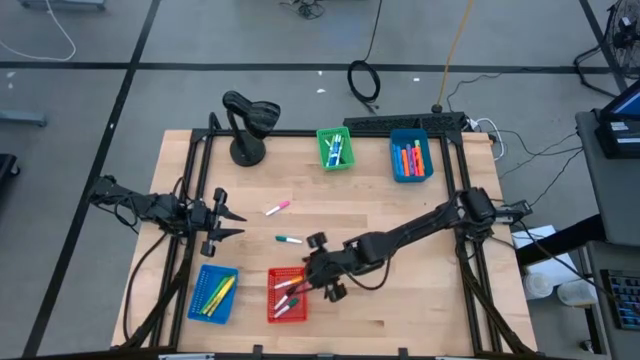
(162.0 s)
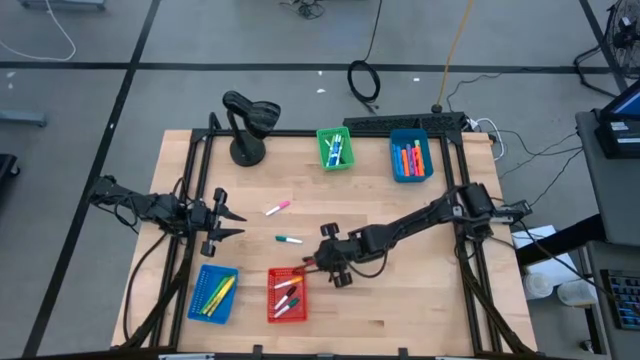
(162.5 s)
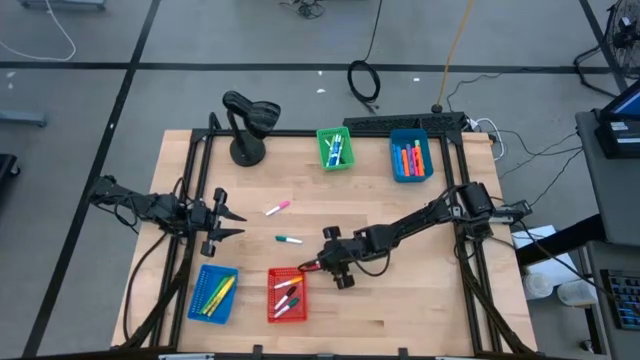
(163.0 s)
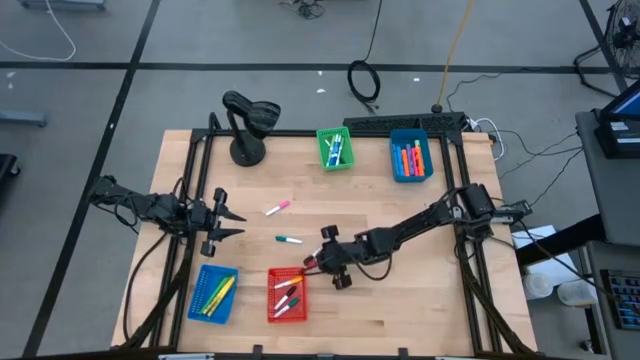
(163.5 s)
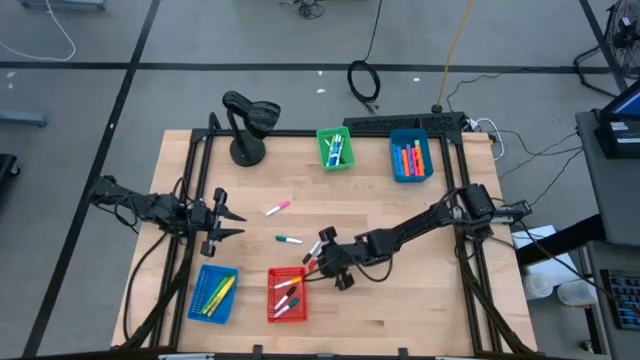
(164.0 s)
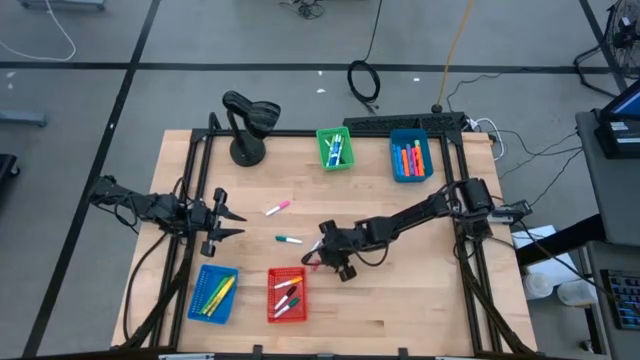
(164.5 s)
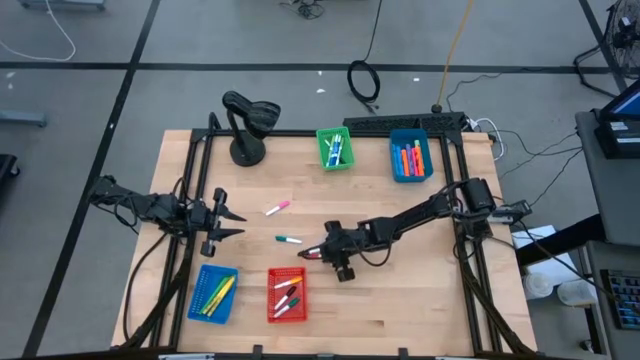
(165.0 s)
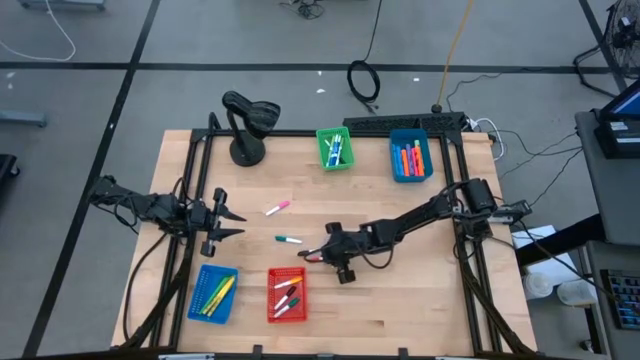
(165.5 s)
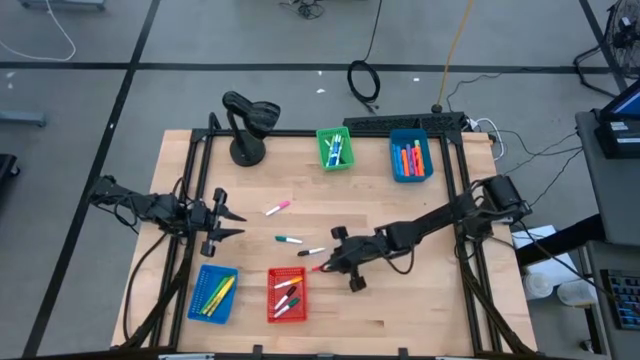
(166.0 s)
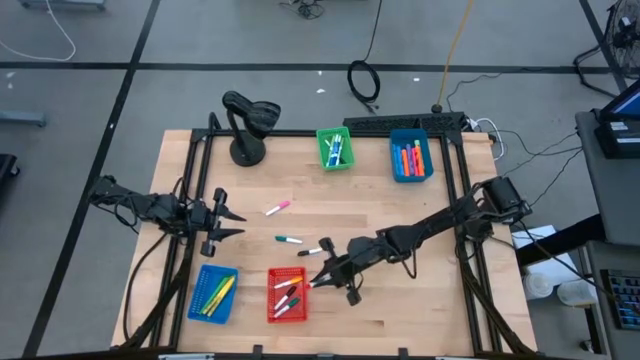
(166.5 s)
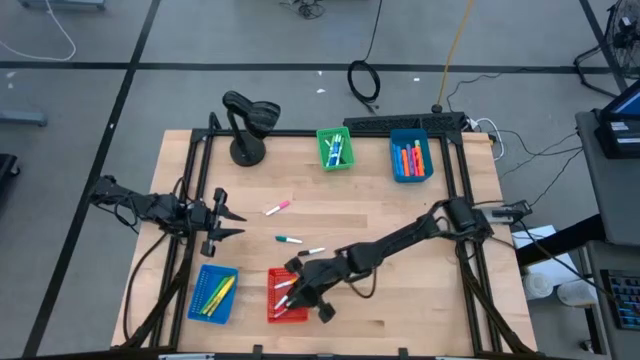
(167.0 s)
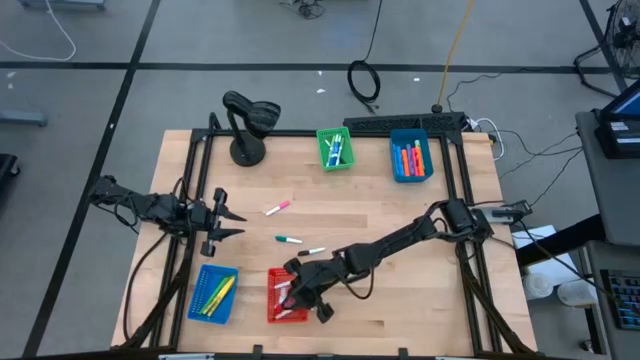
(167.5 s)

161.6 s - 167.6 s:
Task: Pick & Place Markers
Put the red mini marker into the red bin

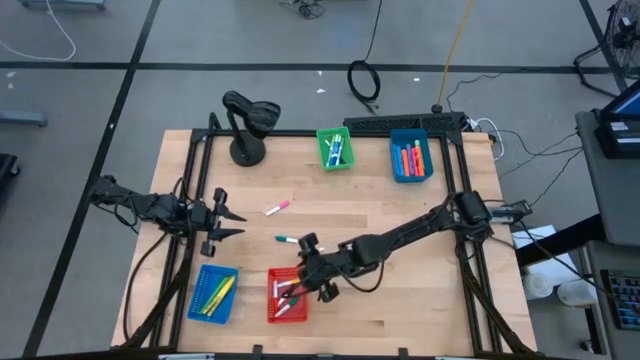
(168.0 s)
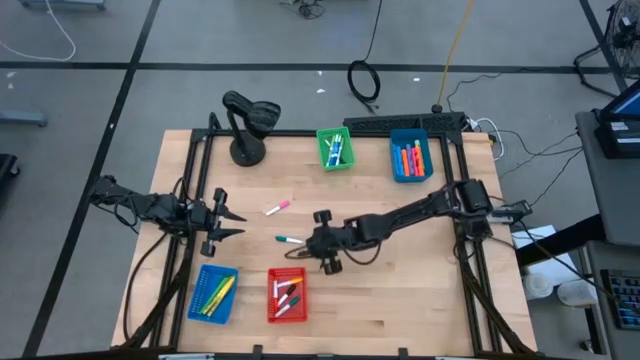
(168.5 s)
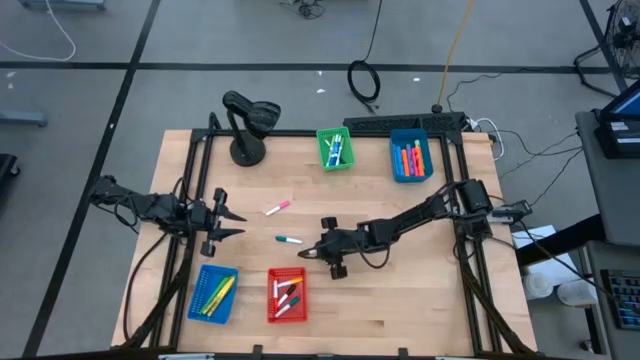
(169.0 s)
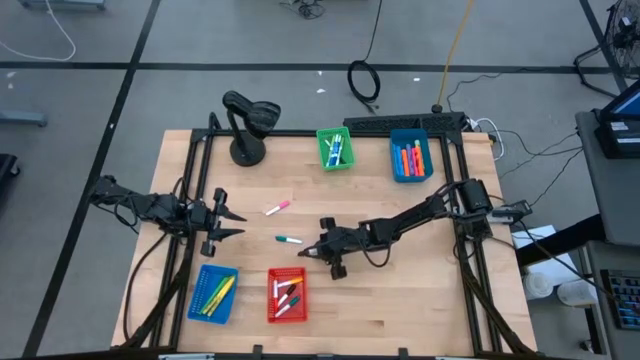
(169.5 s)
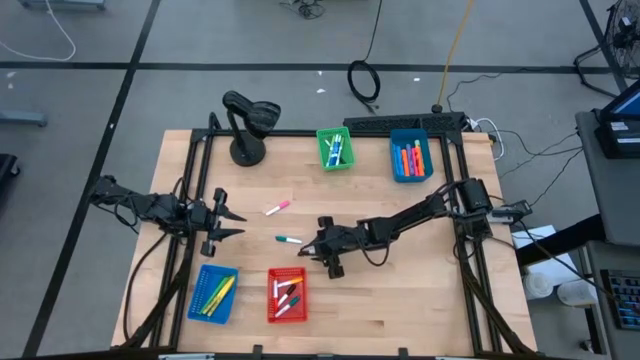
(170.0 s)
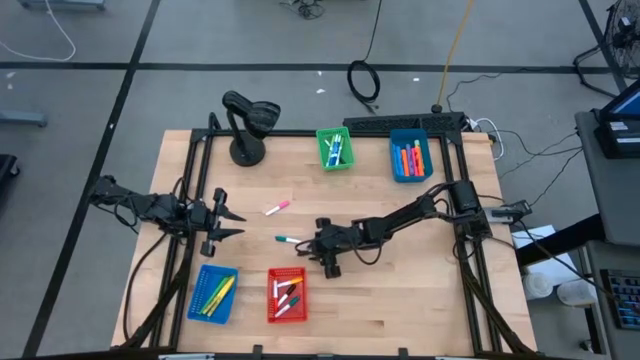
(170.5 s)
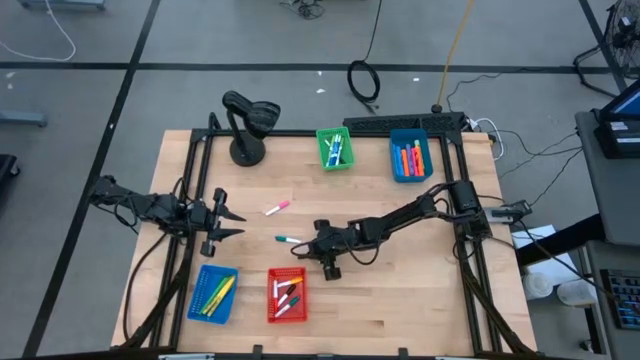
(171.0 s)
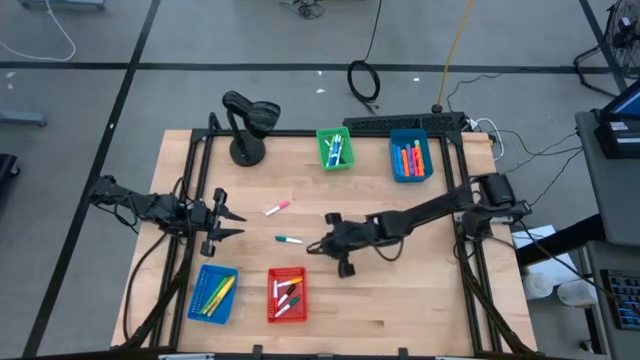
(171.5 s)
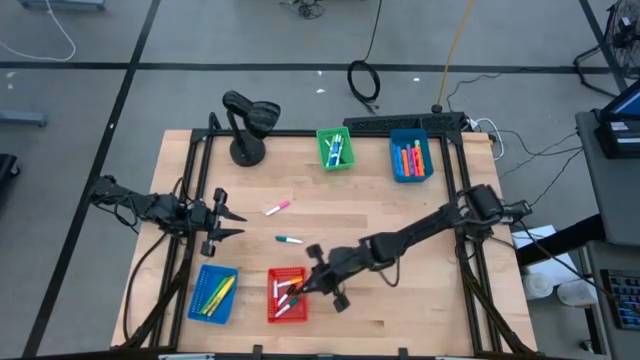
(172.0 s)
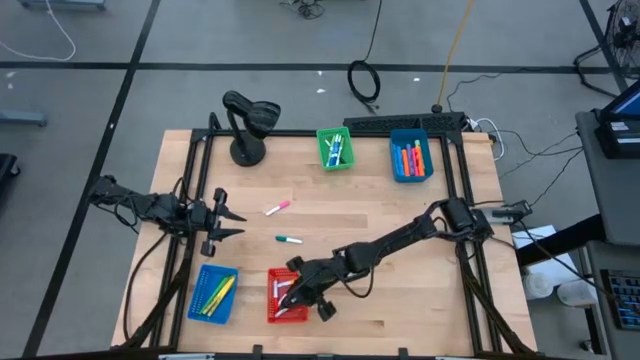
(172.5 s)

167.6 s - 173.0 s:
Put the black mini marker into the red bin

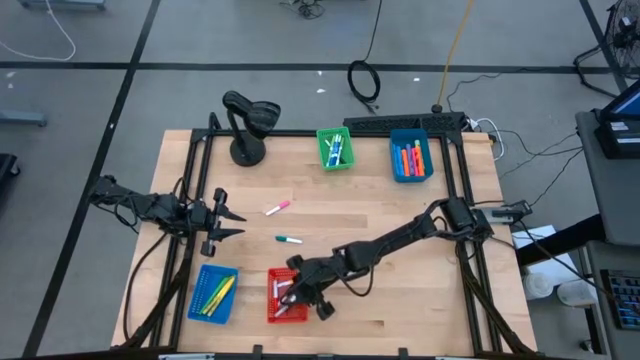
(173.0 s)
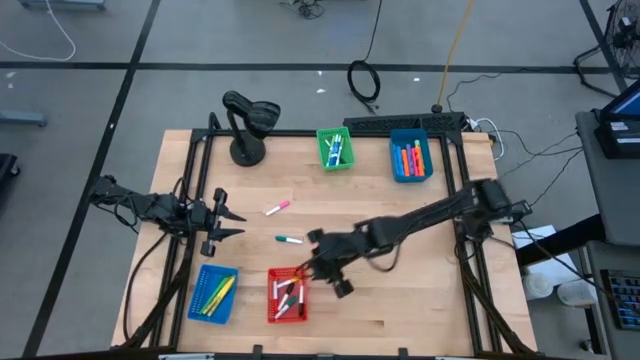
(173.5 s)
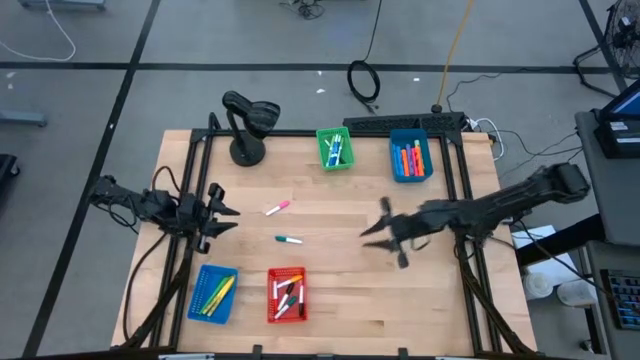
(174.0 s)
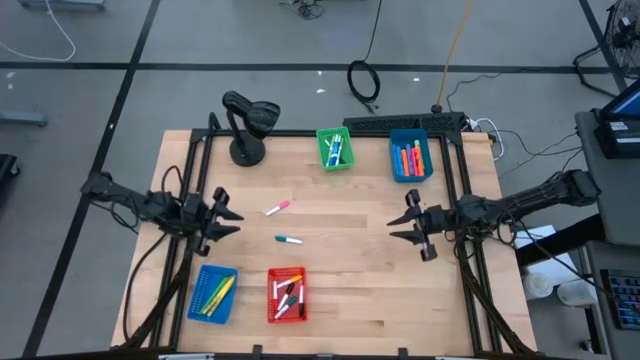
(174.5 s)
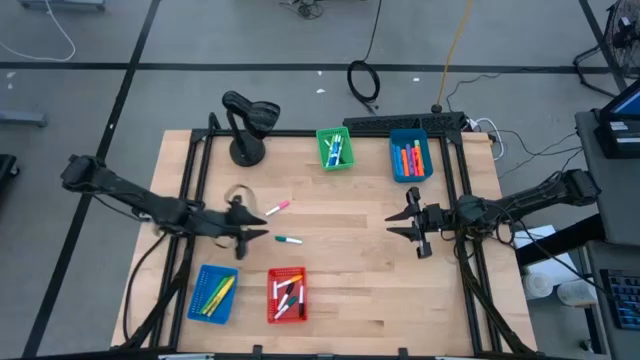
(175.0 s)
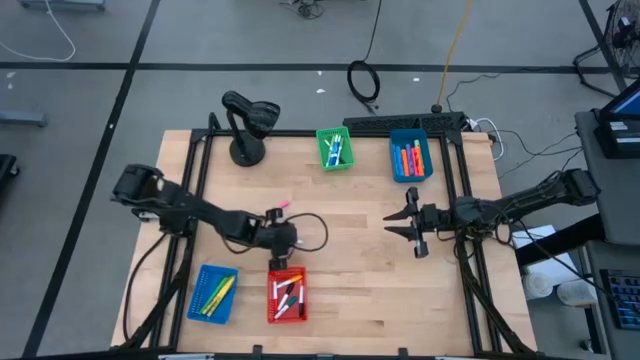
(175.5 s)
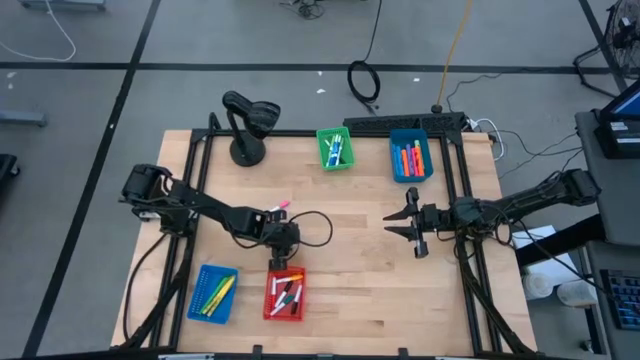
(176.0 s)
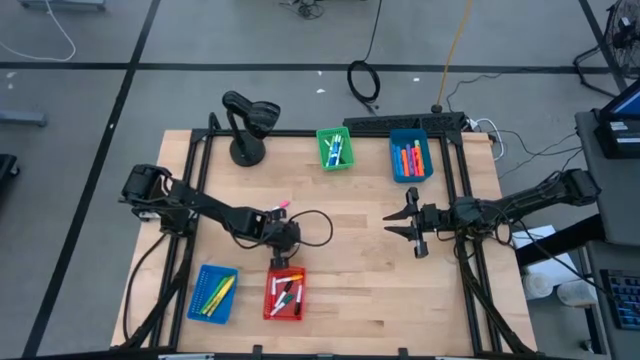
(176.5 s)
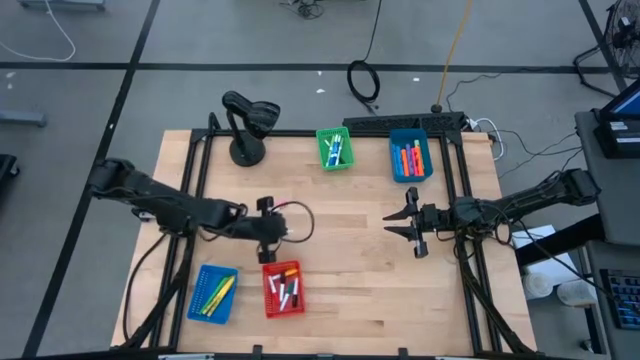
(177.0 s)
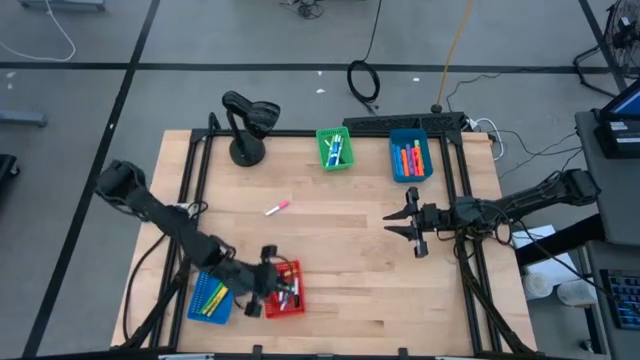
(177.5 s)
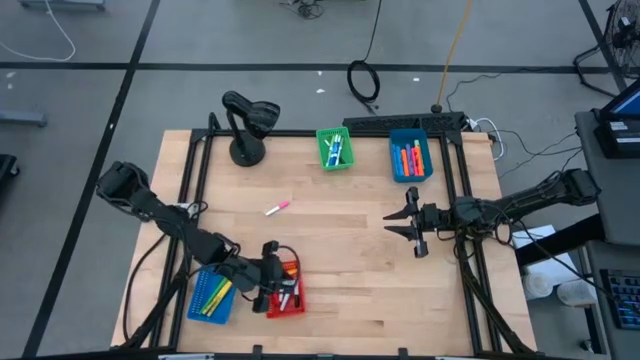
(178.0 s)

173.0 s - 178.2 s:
Put the green mini marker into the red bin

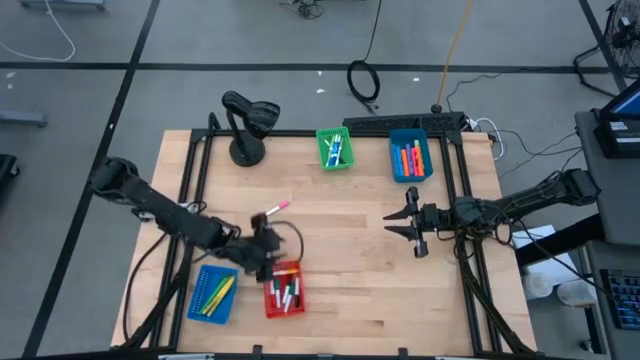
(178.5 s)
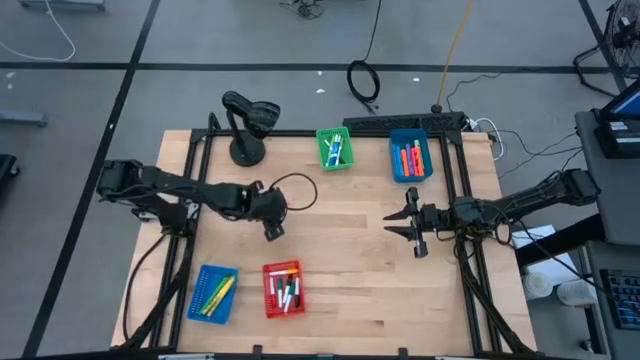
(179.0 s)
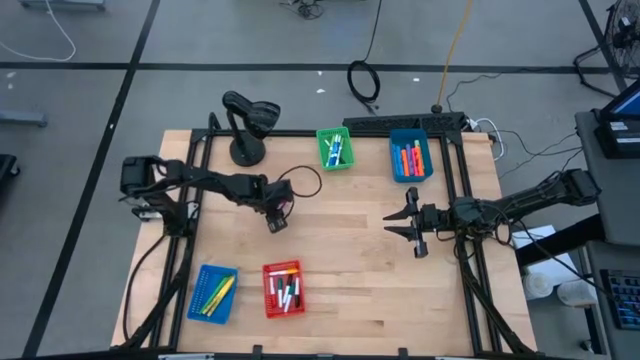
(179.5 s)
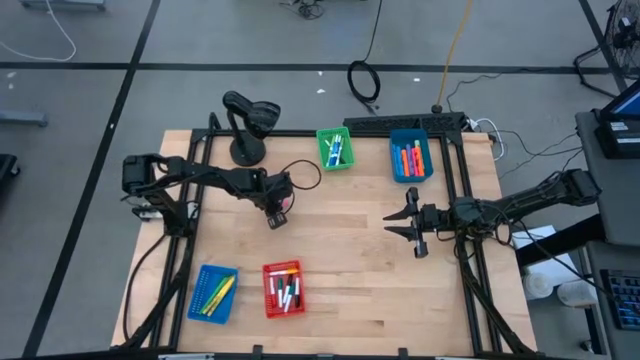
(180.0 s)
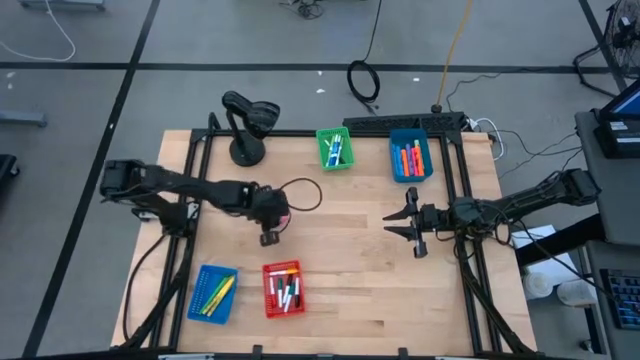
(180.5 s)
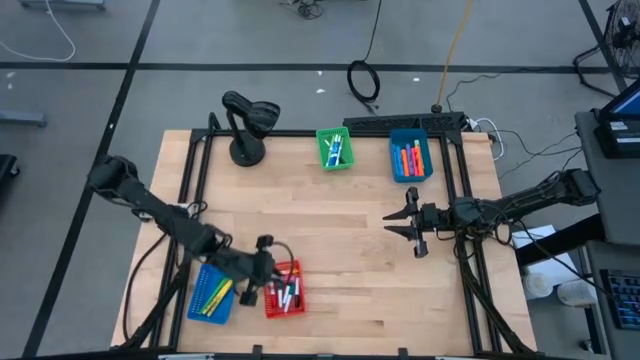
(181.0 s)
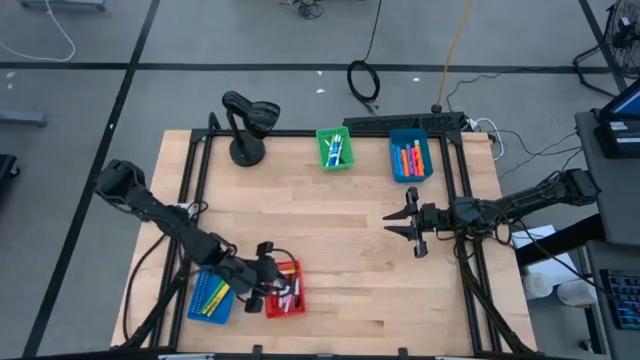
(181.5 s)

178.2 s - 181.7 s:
Put the pink mini marker into the red bin

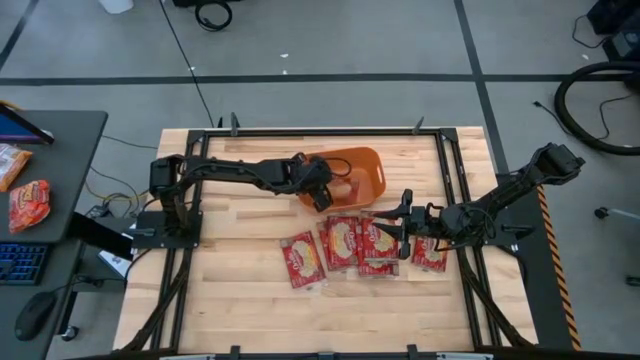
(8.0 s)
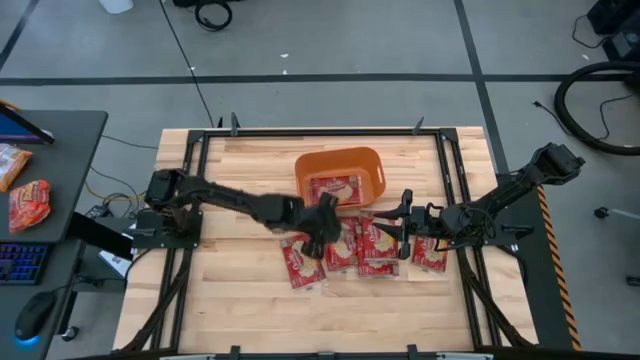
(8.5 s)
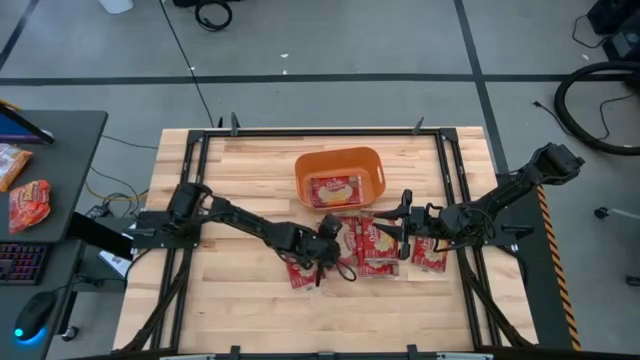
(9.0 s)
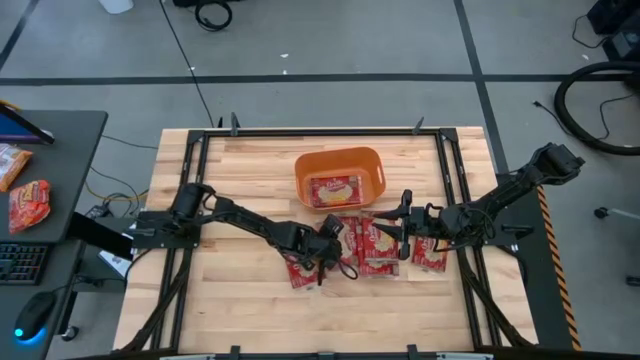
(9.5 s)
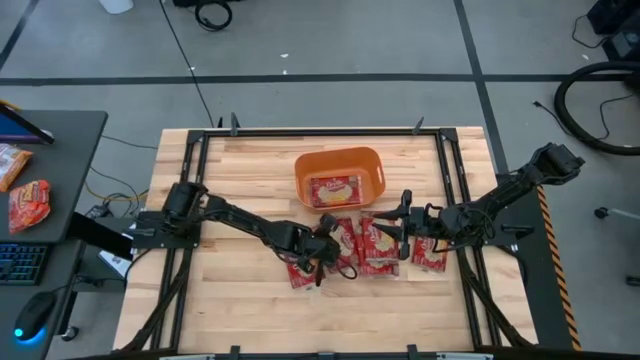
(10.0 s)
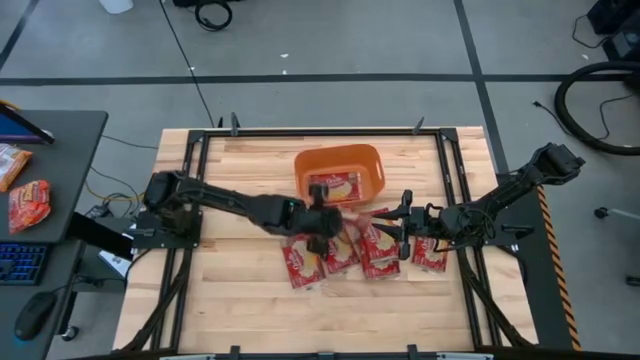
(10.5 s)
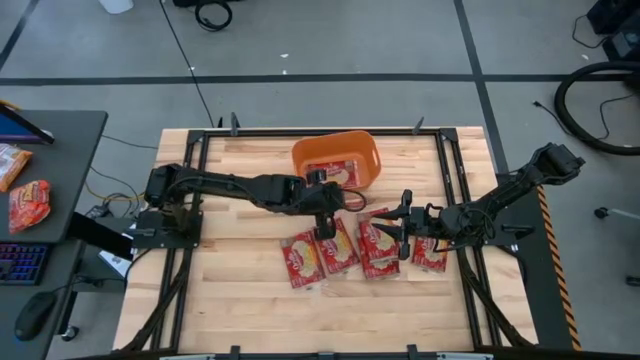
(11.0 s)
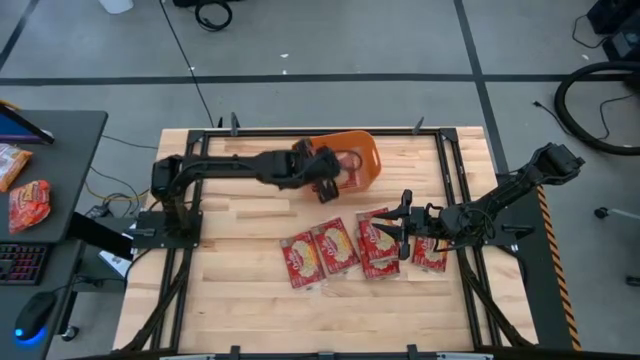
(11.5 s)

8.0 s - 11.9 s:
Task: Sort popcorn bags into baskets
Put the red popcorn bag into the orange bin
